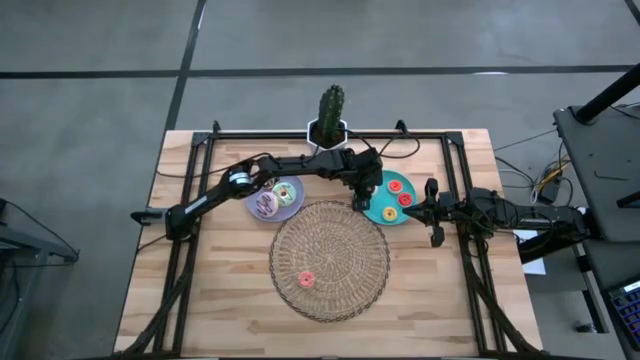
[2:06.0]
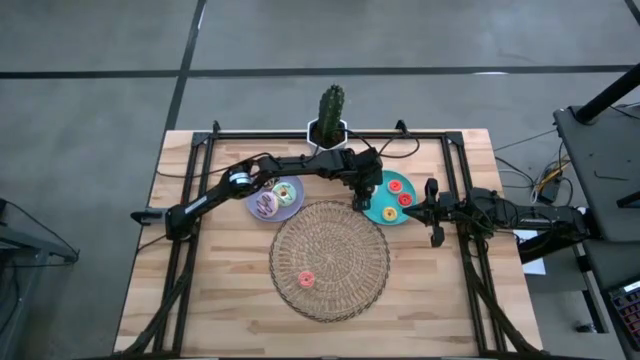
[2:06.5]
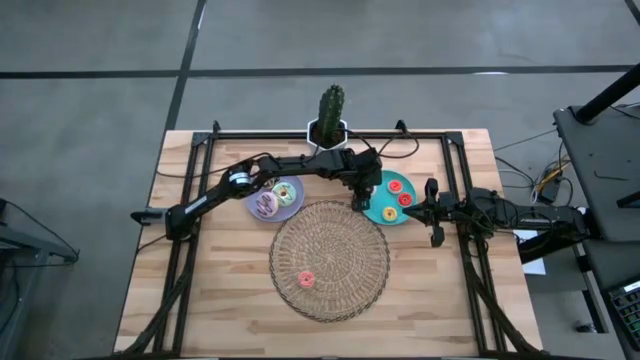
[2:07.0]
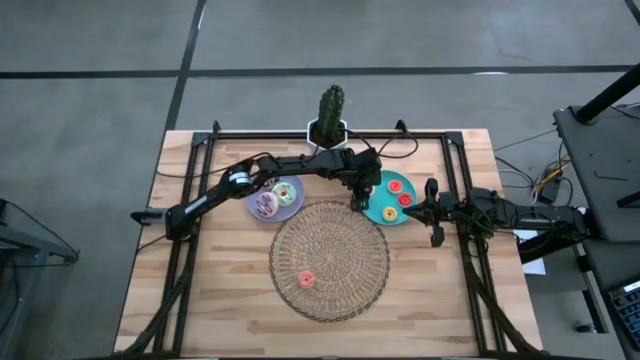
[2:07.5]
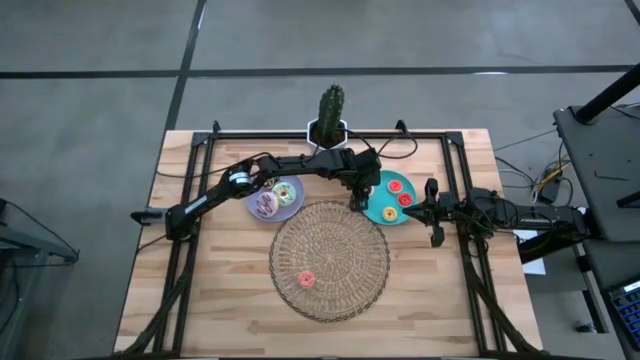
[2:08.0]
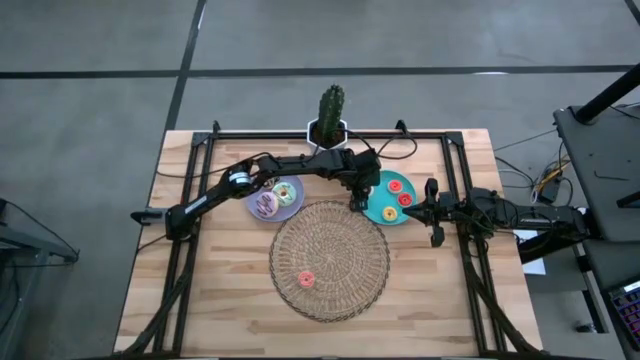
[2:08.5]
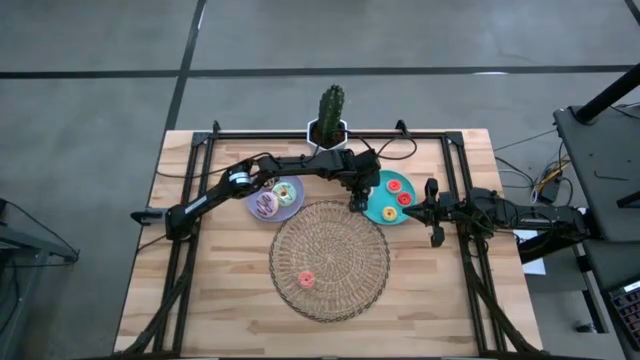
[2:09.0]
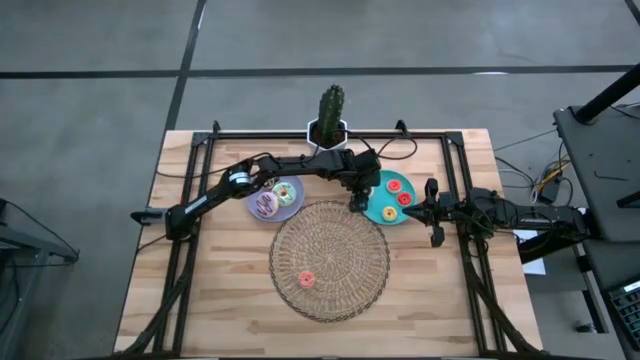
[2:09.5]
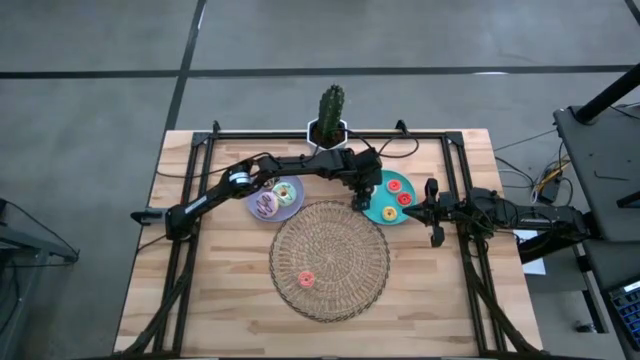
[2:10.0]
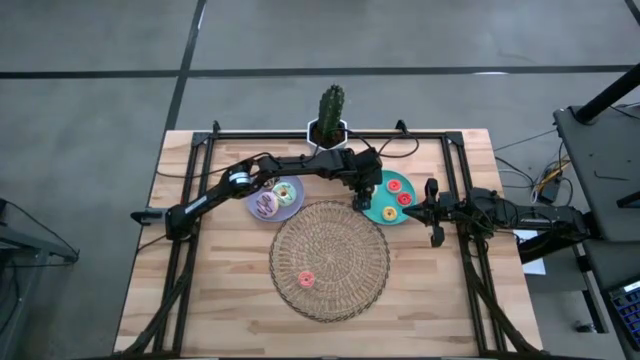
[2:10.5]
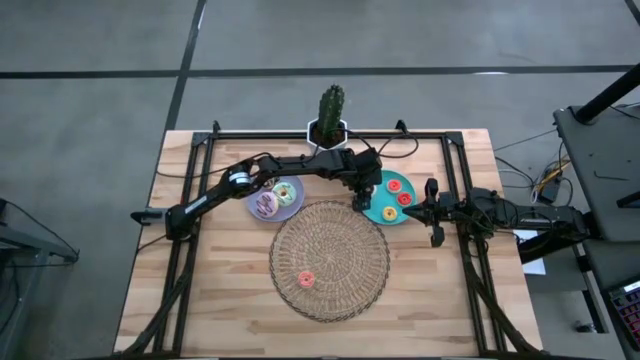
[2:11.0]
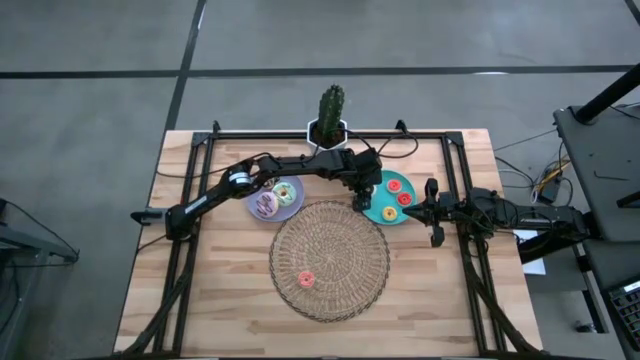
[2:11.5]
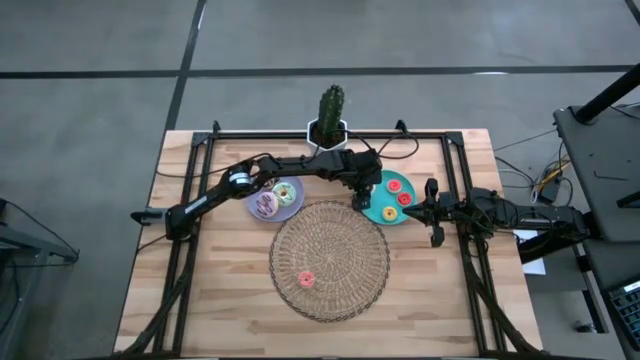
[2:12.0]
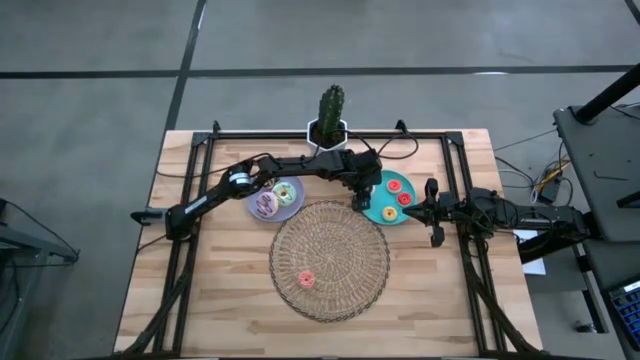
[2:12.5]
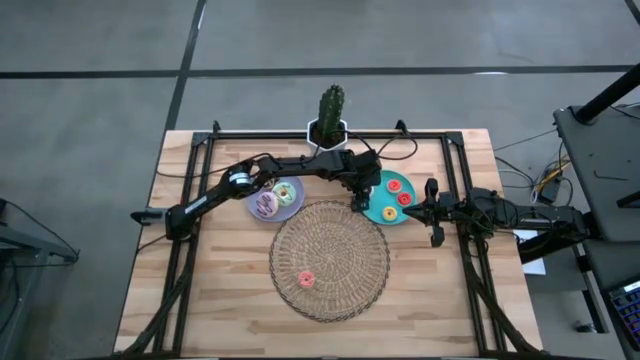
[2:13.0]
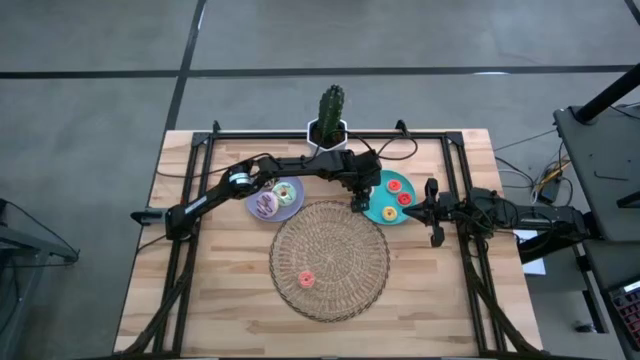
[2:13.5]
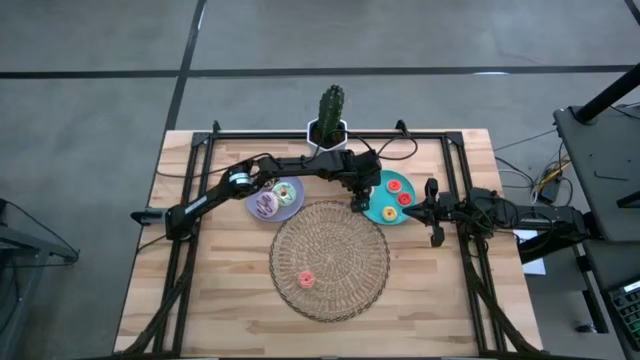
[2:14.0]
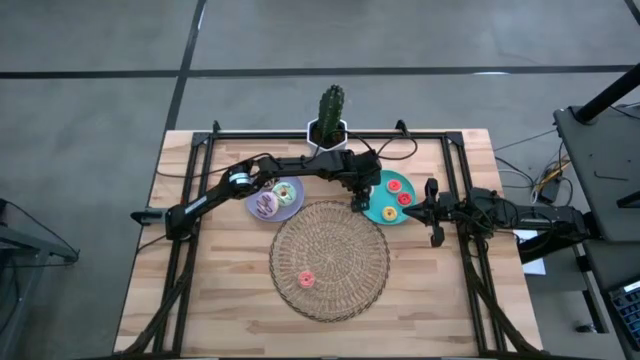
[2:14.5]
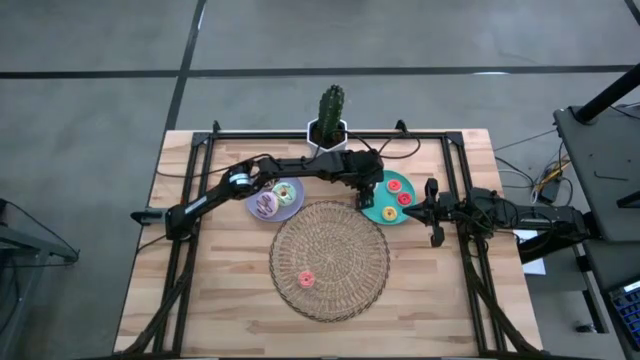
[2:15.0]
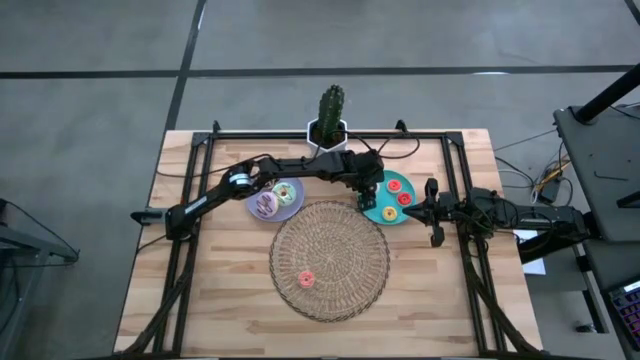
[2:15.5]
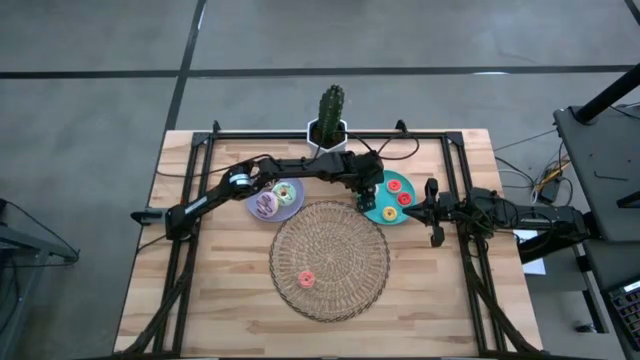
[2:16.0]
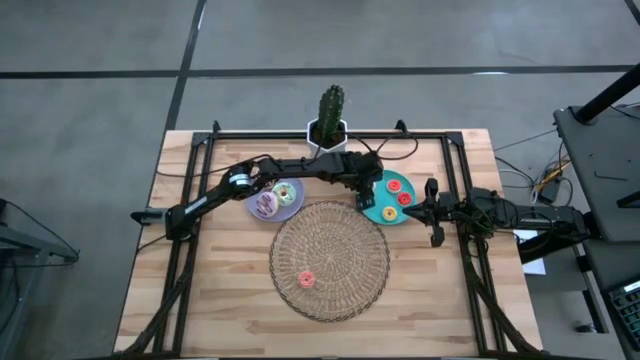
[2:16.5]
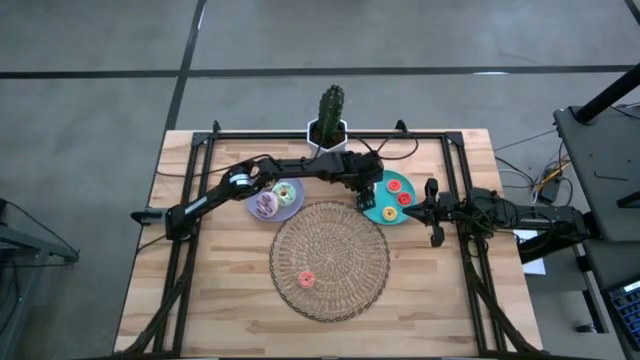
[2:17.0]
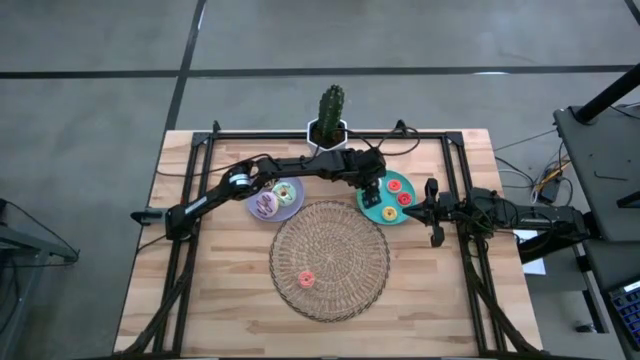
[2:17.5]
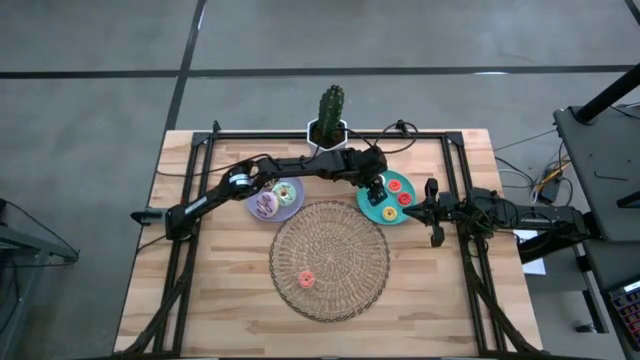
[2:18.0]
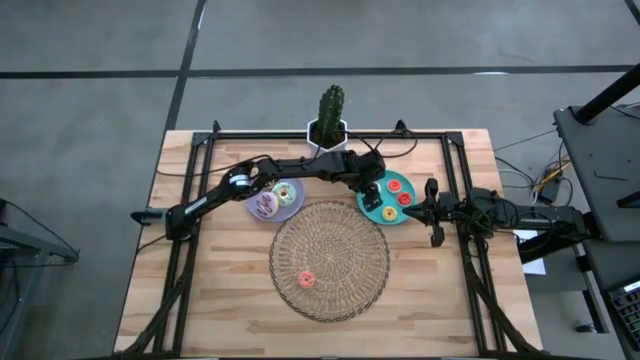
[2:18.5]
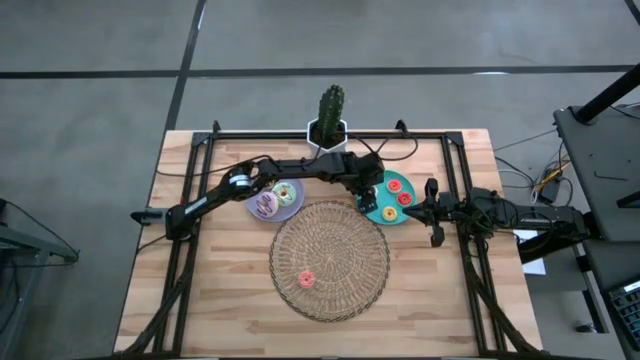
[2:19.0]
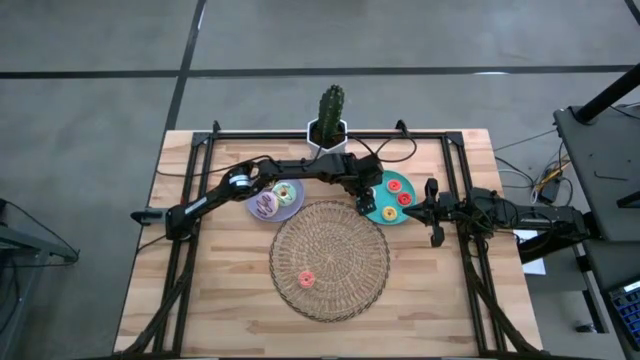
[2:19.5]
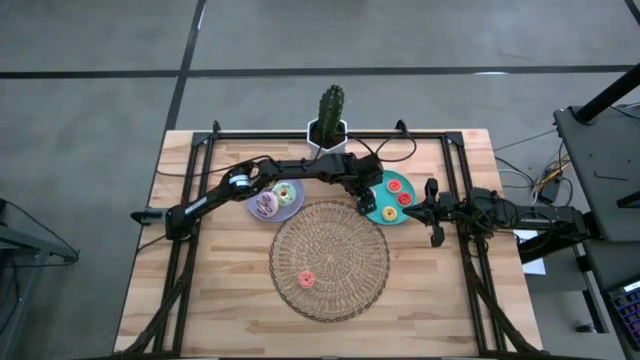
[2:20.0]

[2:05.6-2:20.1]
Task: Pick & Place donuts
Put the small brown donut on the blue plate
